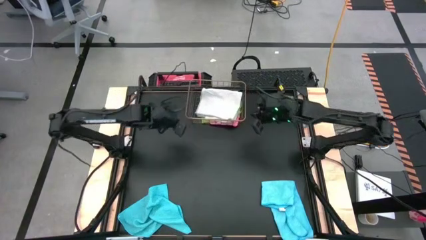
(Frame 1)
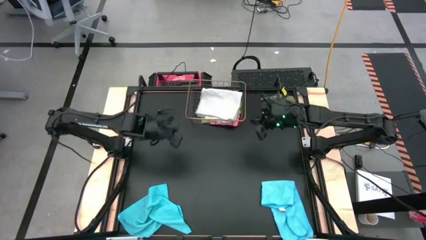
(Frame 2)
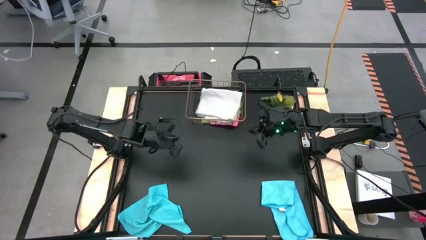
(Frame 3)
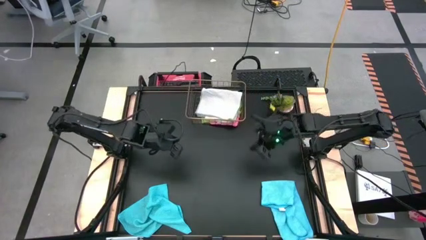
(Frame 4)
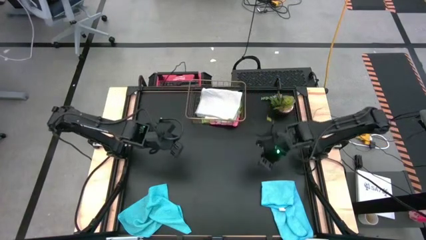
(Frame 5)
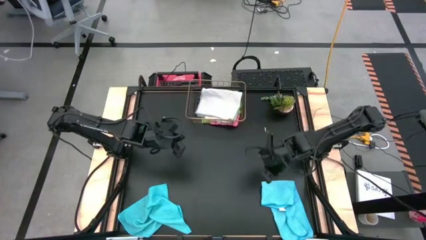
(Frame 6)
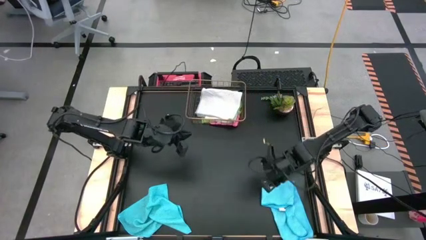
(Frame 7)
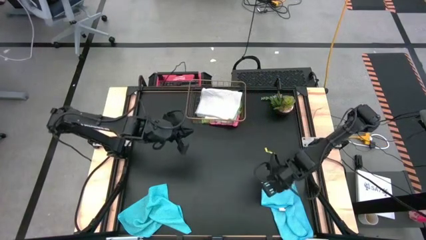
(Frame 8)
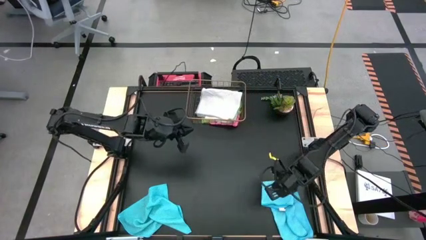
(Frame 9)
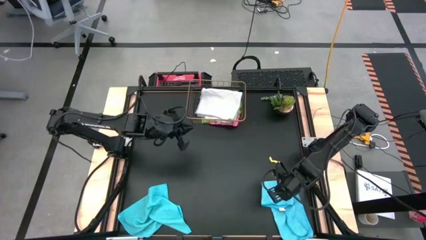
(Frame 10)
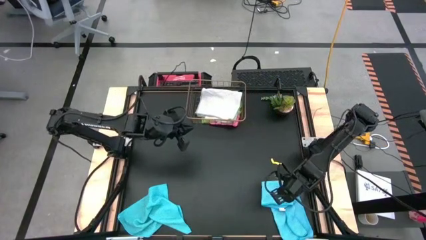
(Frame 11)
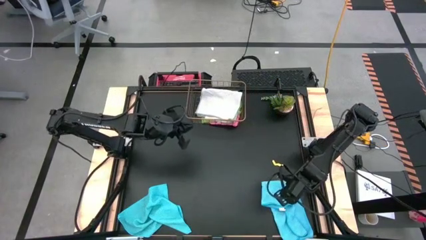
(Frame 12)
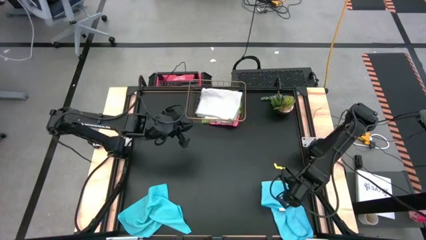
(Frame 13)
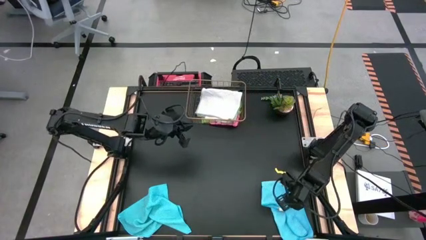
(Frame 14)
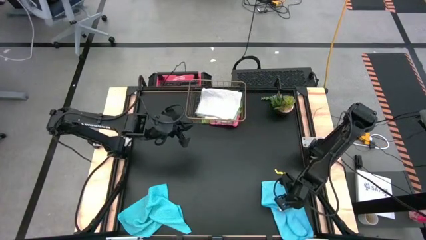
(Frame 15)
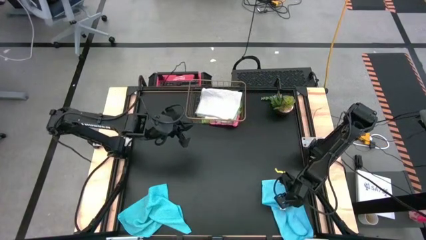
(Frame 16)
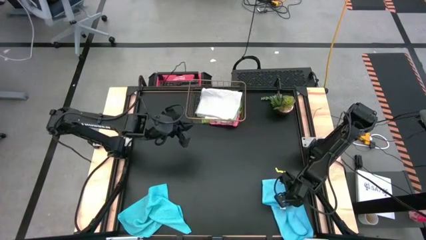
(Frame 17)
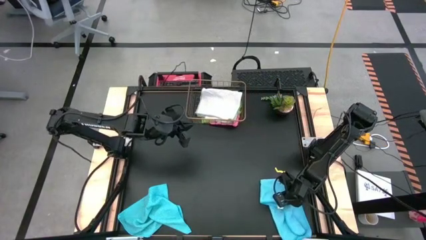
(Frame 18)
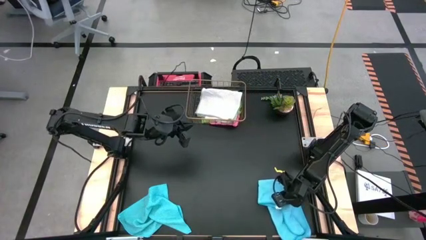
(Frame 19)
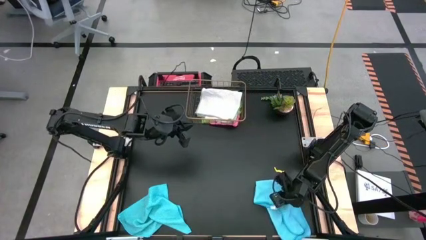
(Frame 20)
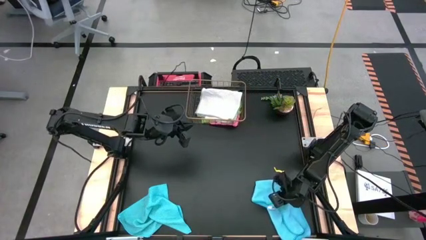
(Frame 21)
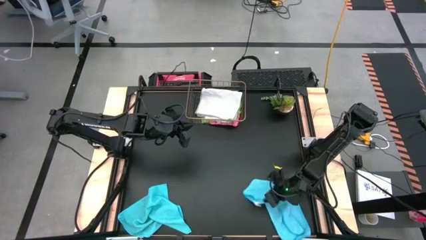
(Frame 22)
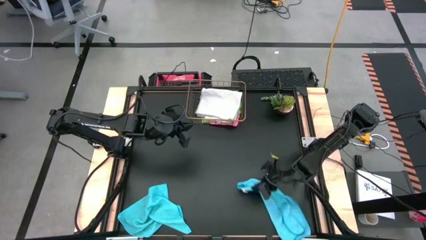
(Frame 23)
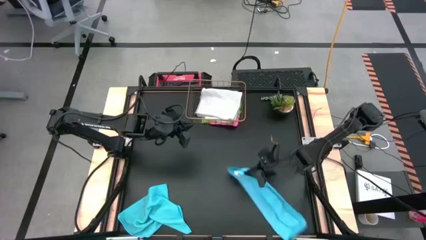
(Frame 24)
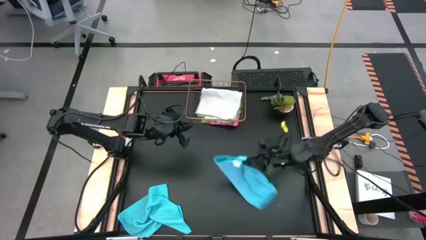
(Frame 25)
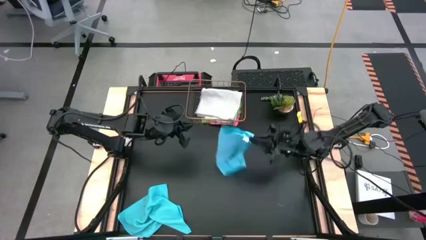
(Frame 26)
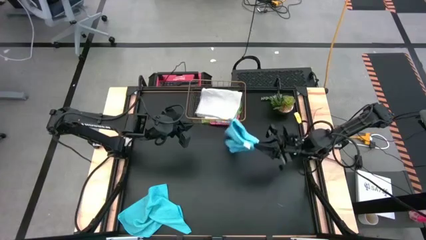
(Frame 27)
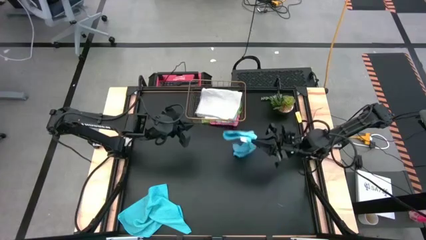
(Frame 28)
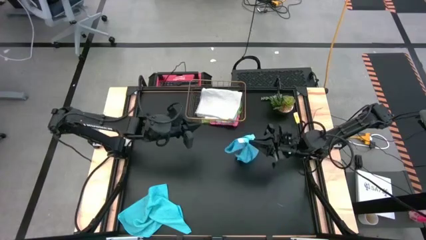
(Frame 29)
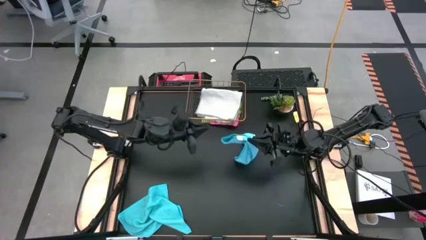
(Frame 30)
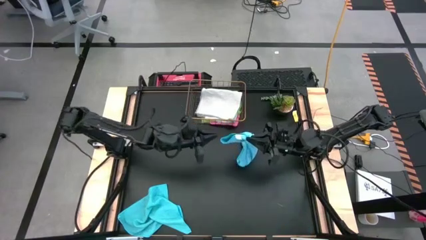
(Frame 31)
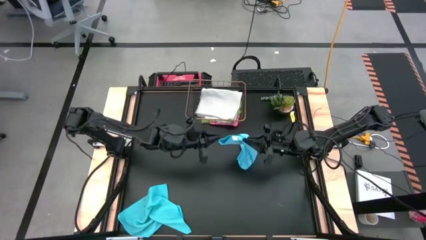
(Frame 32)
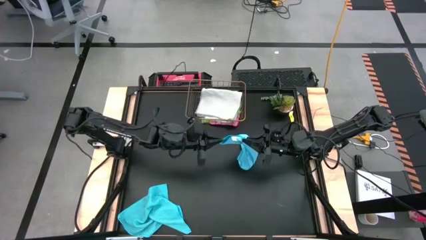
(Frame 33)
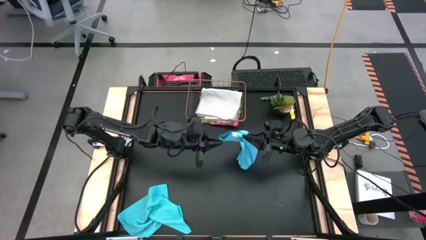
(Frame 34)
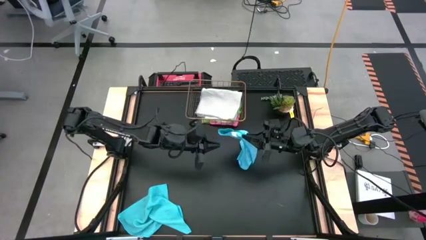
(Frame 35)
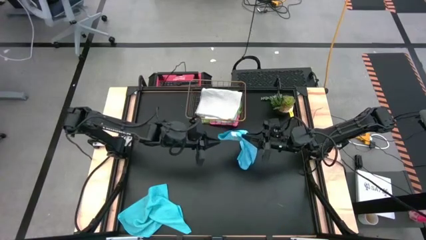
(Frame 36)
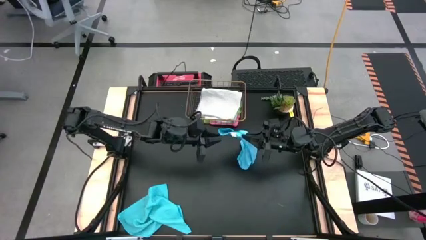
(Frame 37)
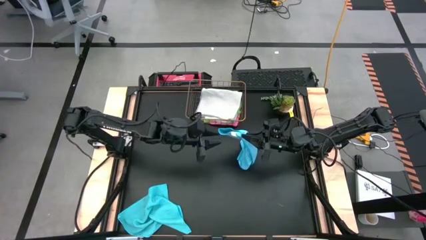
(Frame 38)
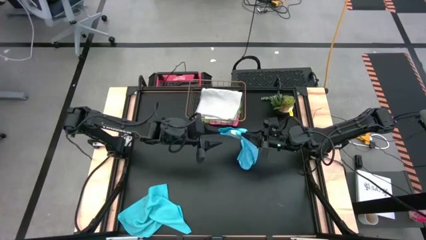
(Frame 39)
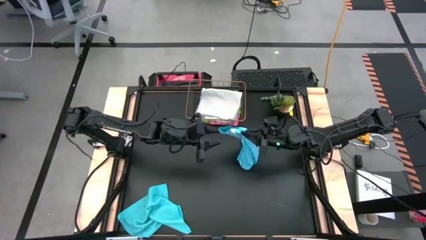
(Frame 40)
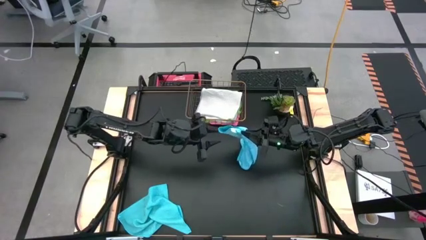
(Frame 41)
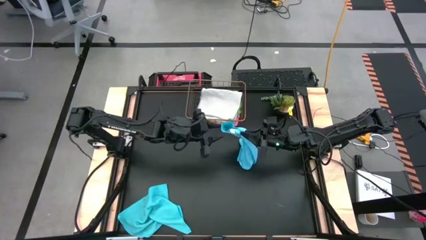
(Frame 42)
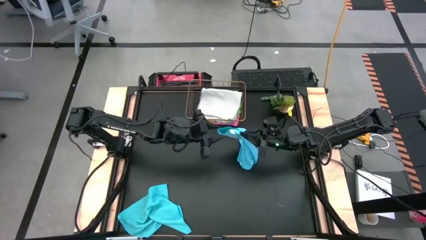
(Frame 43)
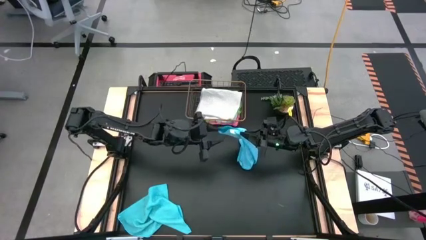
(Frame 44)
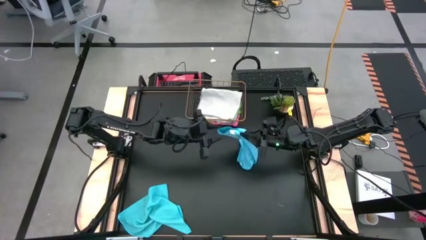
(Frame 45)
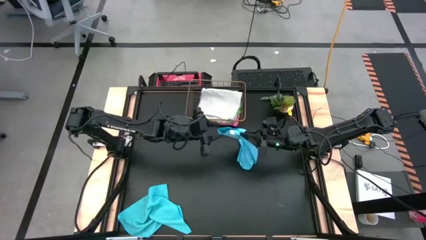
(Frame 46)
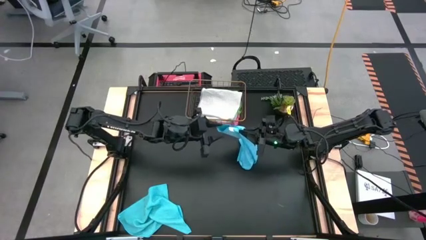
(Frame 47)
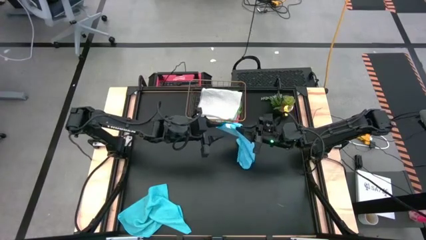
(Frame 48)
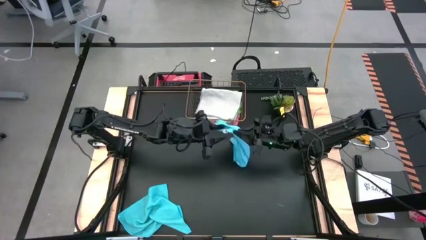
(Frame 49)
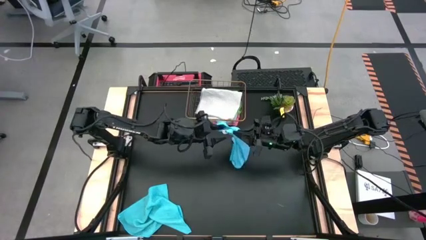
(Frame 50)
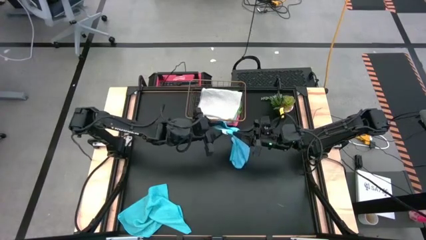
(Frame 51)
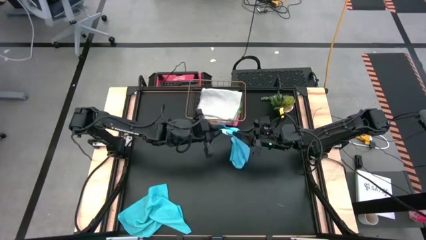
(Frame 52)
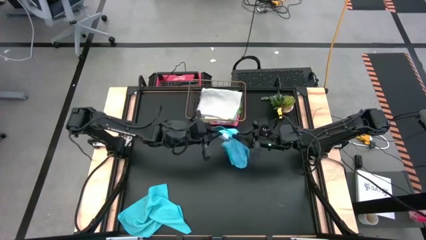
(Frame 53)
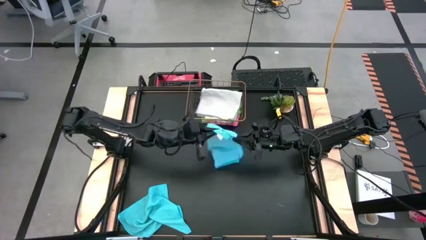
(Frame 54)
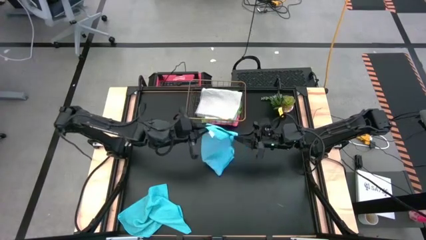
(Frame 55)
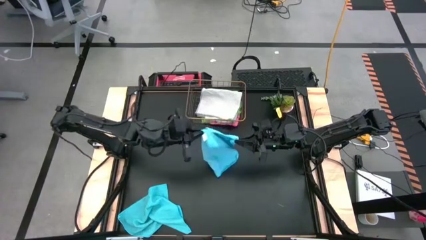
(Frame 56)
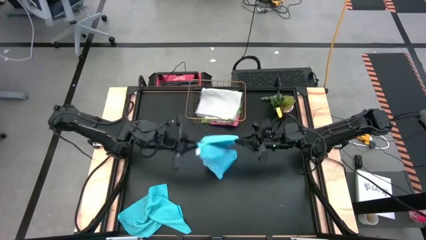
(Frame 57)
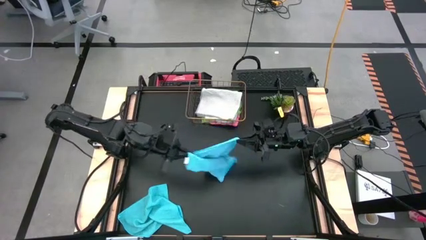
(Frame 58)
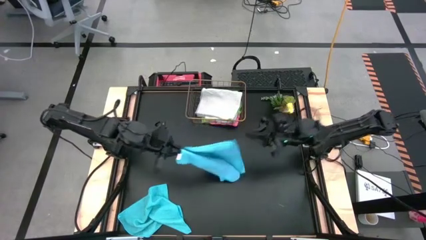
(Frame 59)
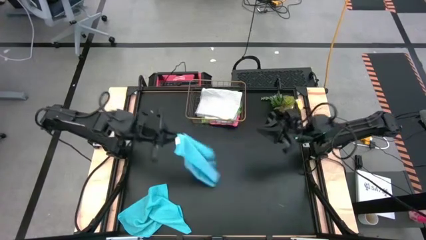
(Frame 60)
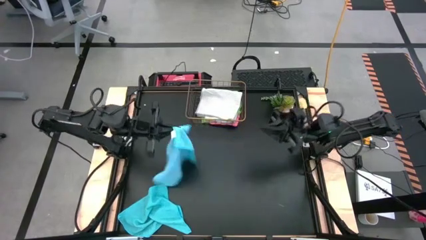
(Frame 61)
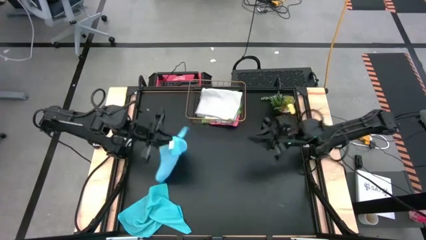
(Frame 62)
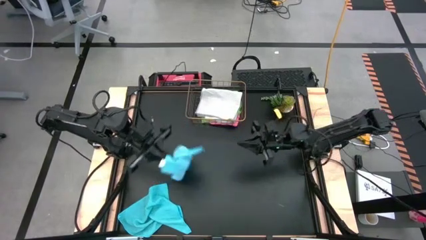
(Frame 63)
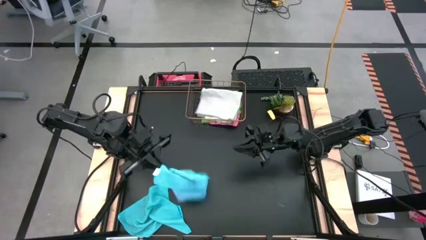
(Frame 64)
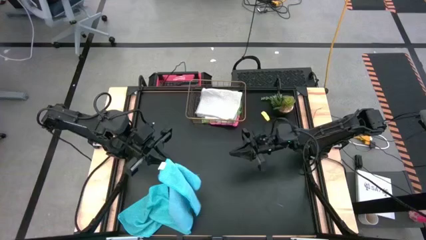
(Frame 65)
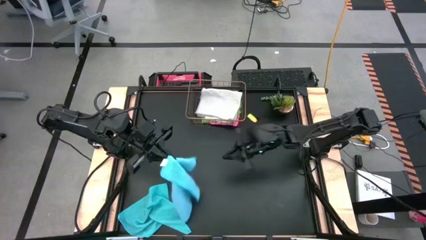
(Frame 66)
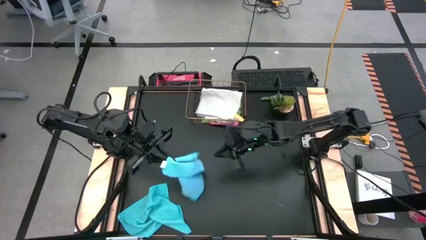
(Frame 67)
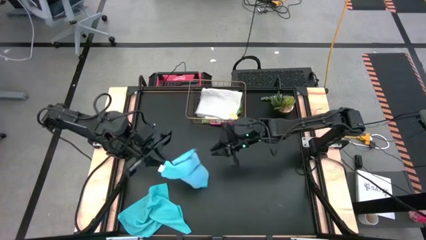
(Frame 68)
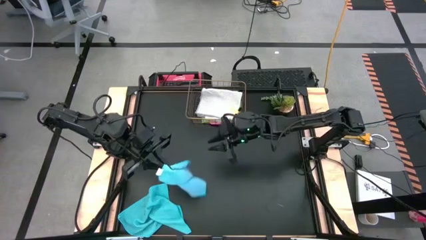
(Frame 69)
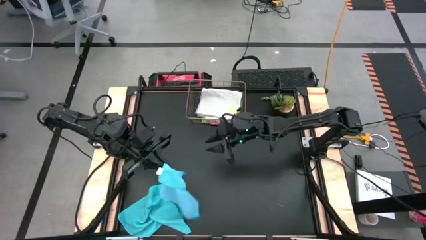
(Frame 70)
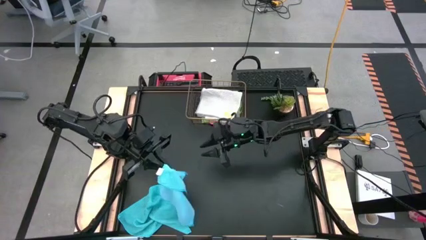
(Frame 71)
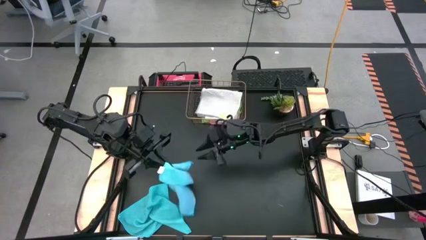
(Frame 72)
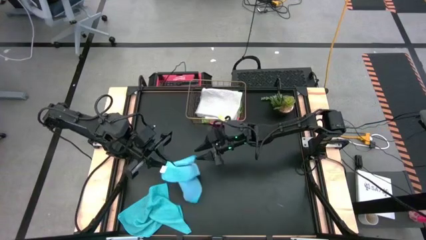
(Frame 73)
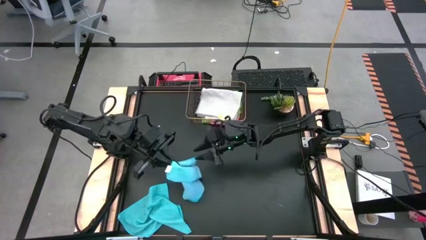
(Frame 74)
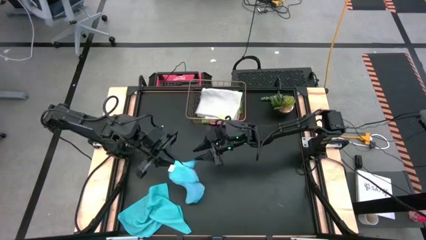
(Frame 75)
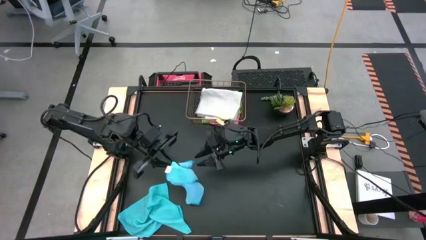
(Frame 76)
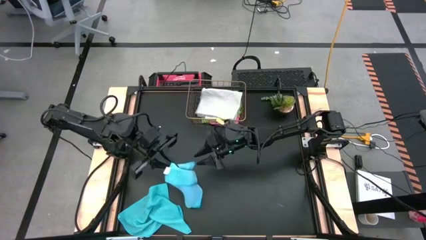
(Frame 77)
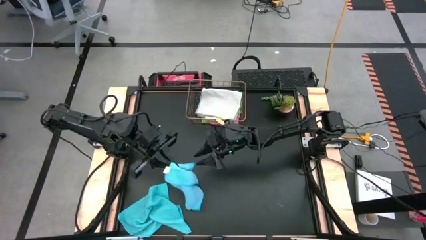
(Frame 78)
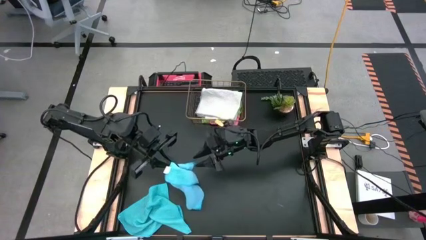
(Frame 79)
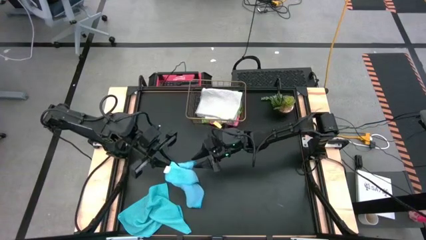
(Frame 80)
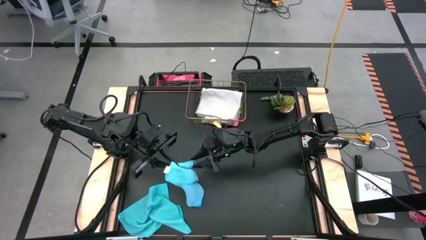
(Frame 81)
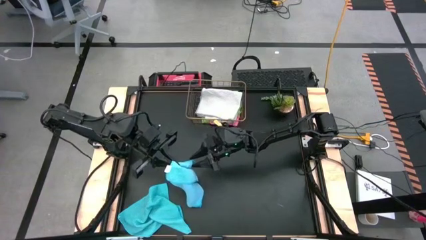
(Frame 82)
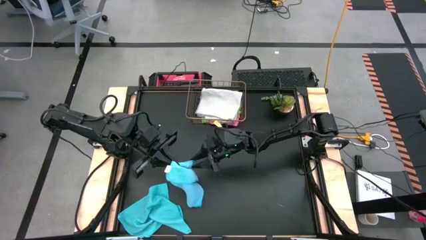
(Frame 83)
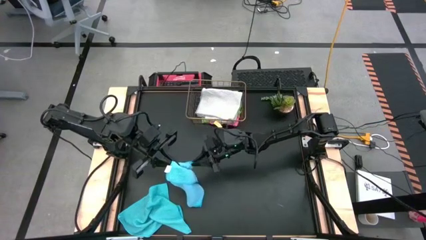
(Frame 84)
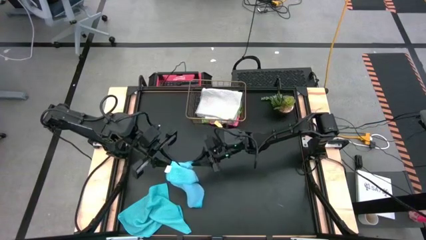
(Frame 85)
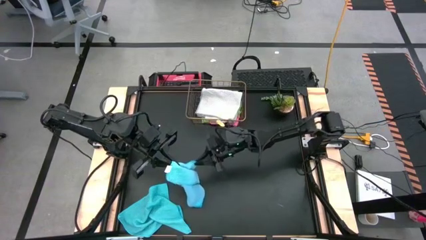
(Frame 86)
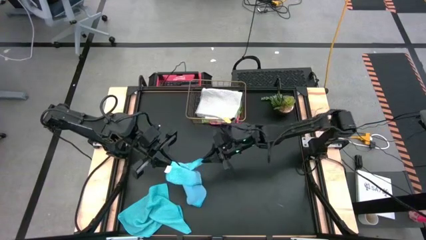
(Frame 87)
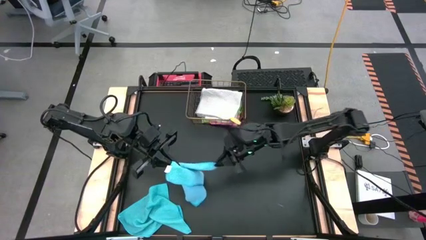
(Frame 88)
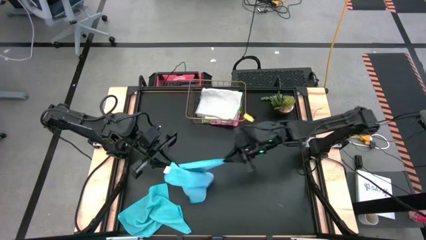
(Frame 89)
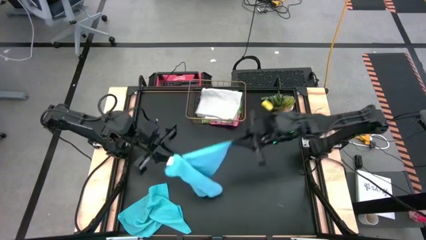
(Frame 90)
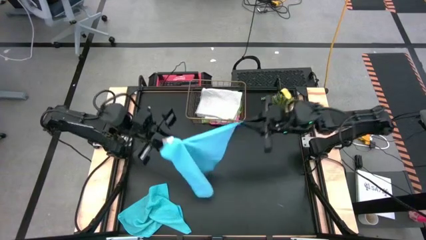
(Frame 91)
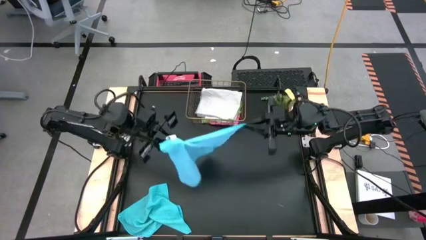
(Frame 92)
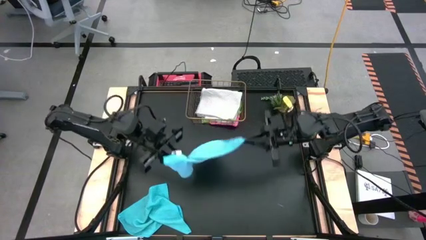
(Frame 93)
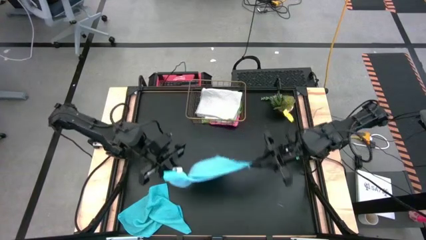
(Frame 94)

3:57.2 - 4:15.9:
Task: Fold microfiber towels
Fold the right light blue microfiber cloth in half
